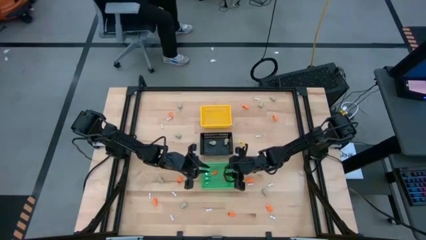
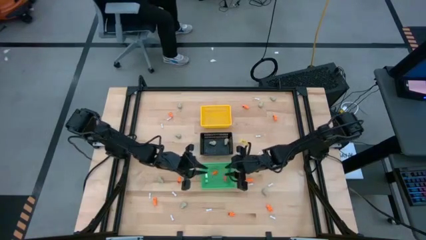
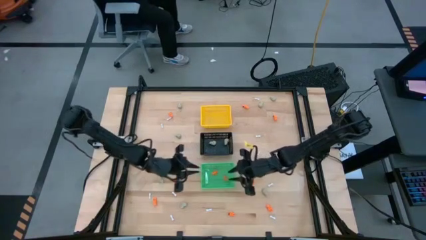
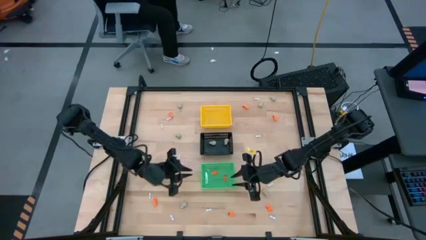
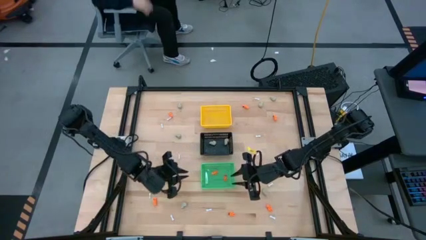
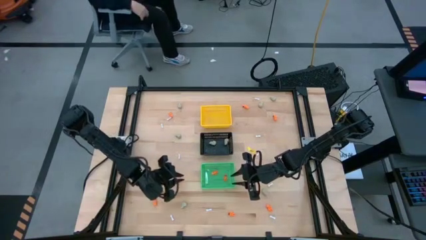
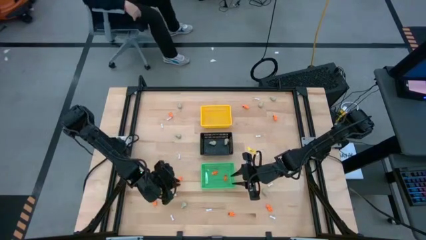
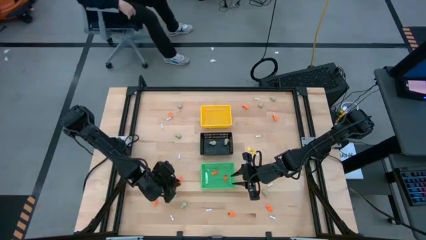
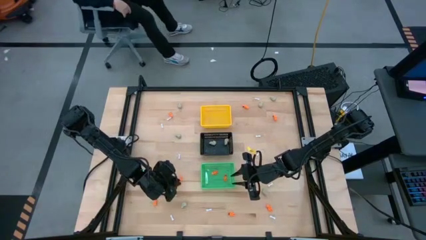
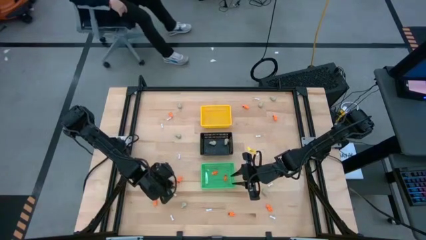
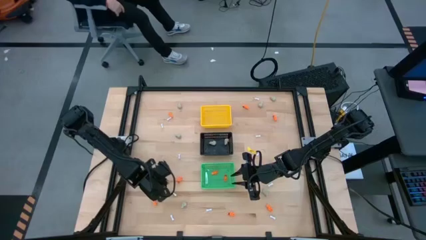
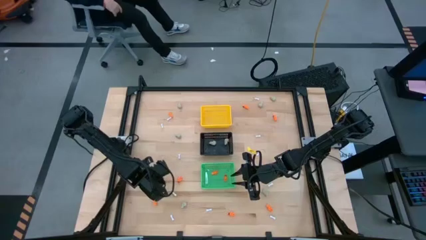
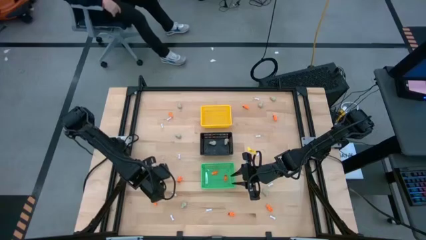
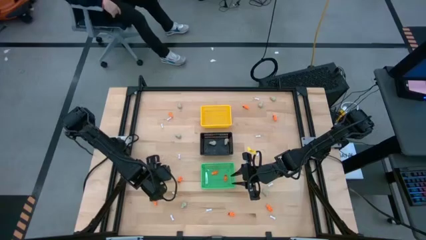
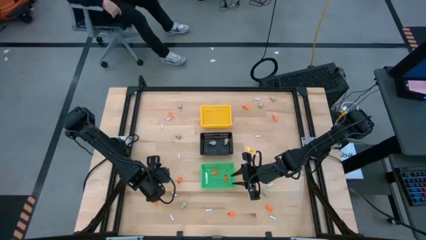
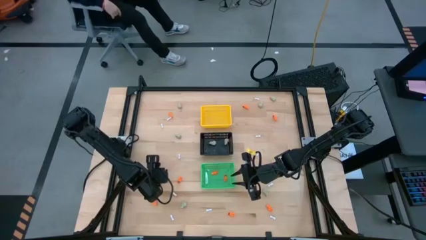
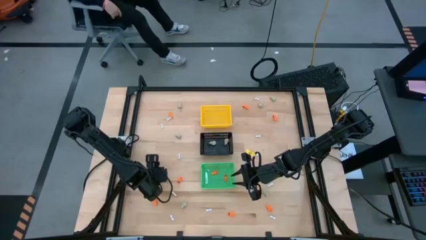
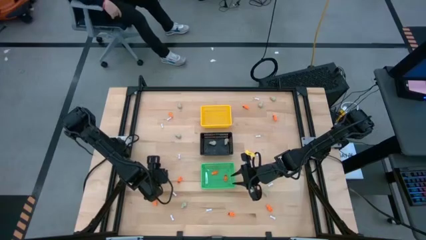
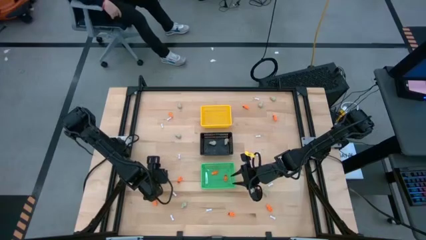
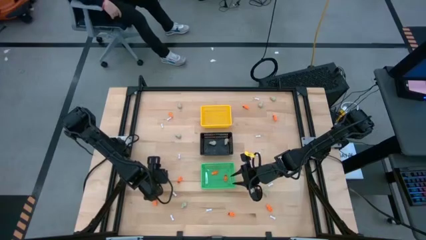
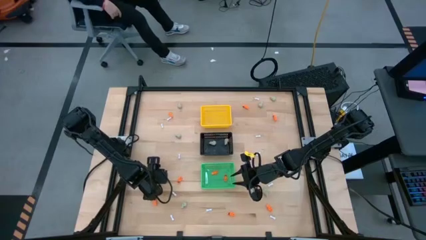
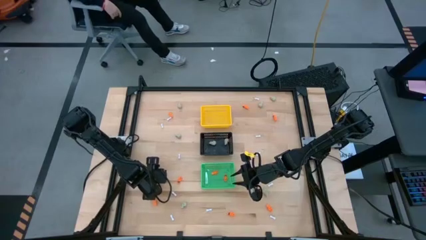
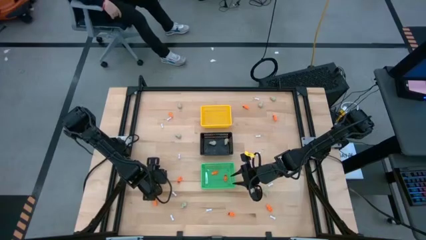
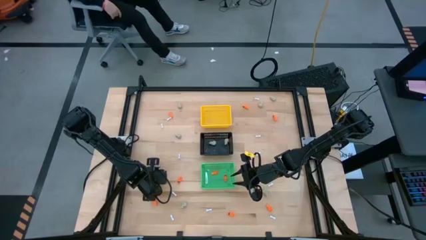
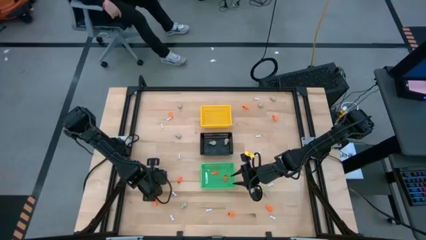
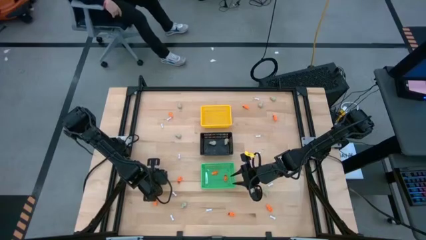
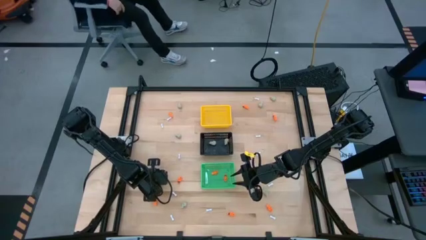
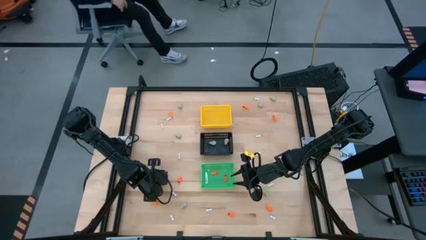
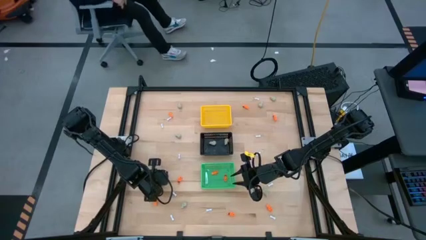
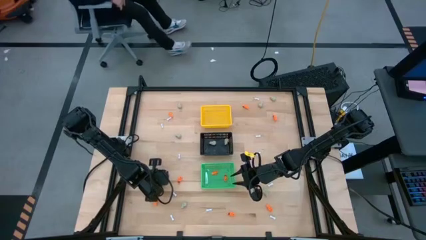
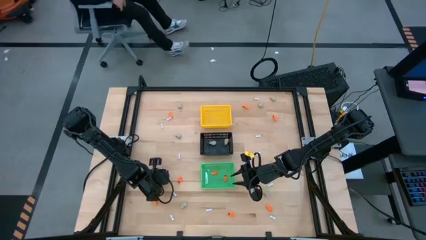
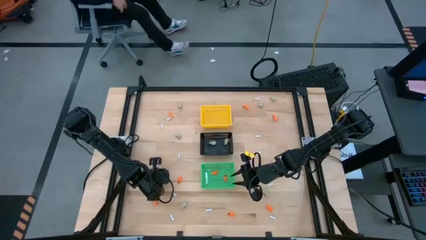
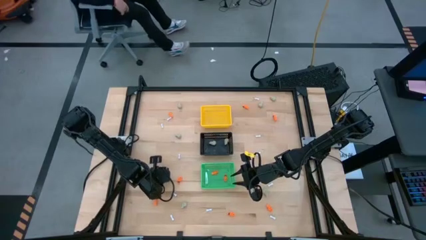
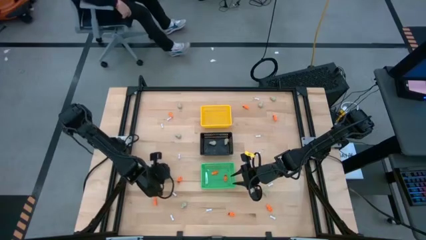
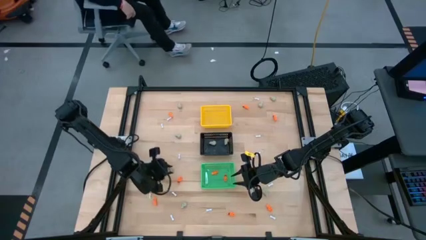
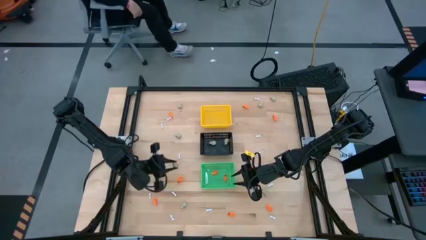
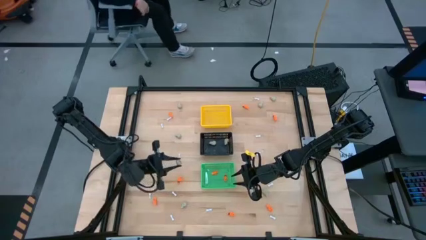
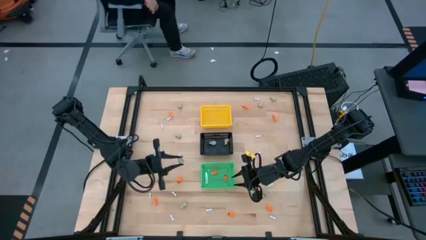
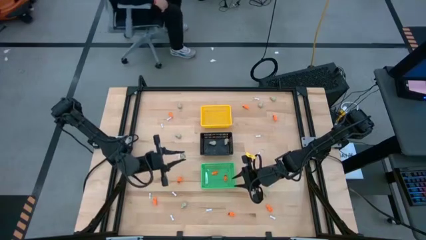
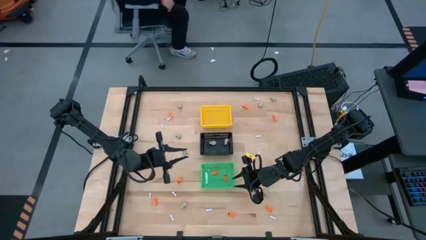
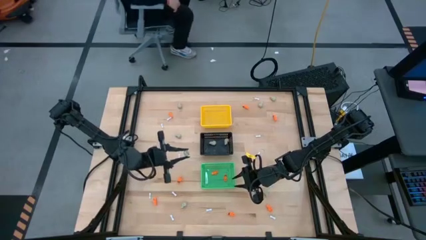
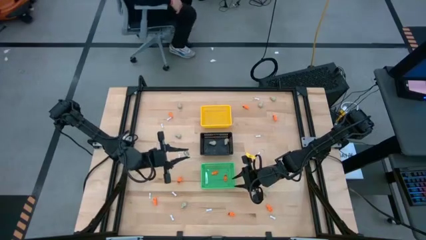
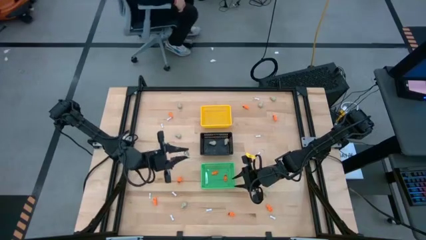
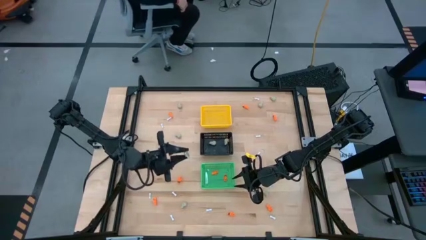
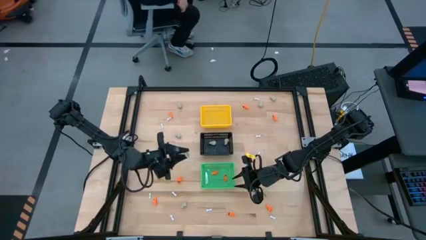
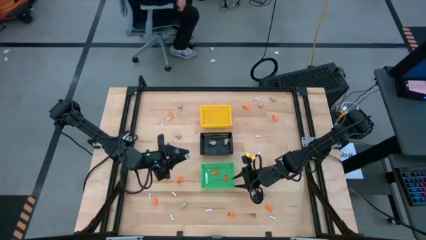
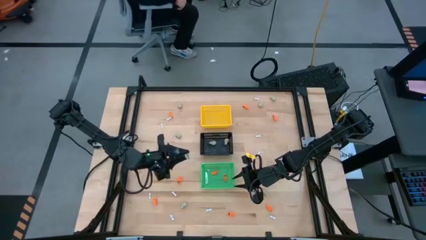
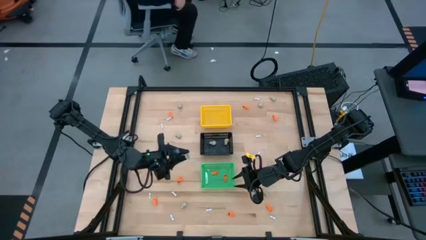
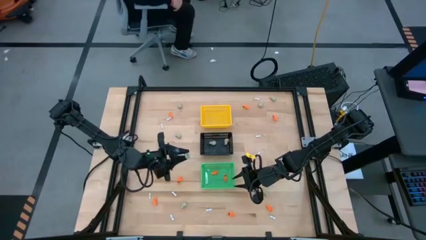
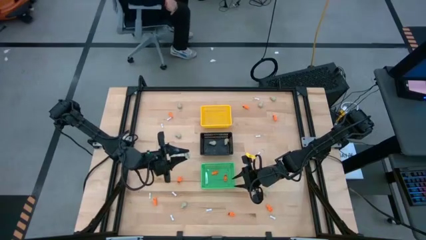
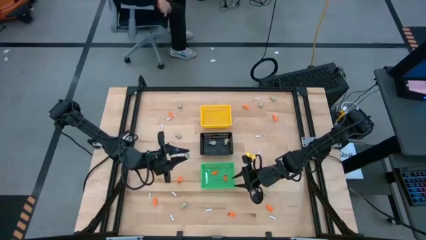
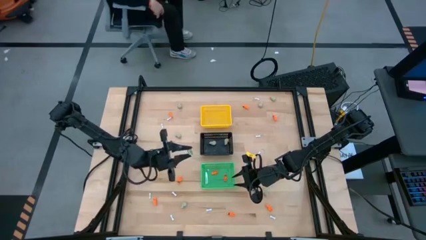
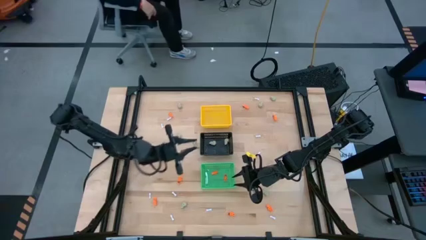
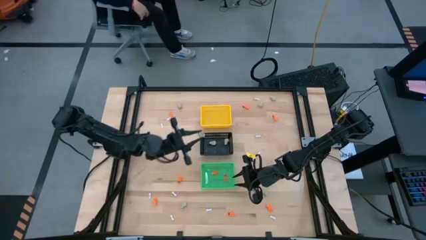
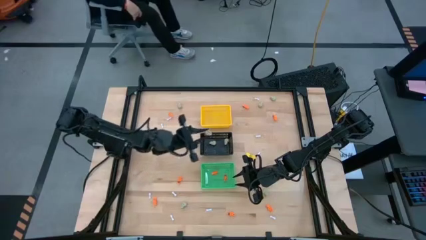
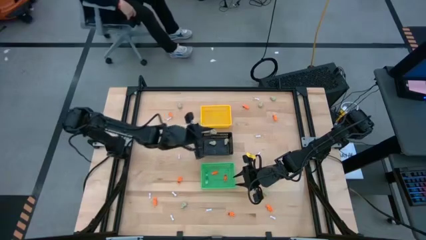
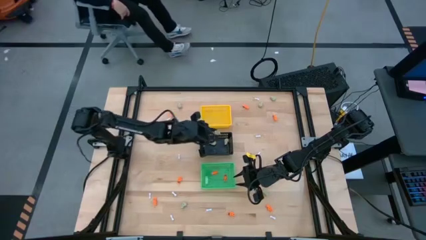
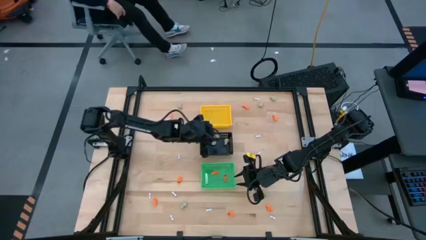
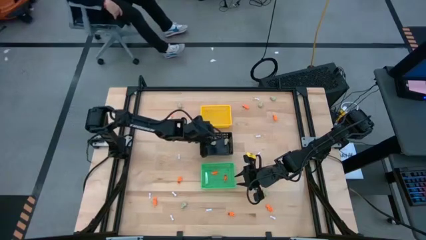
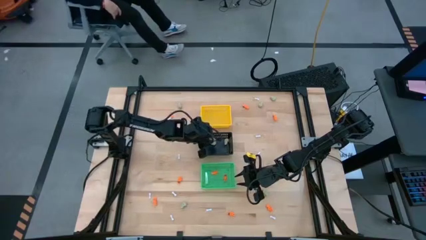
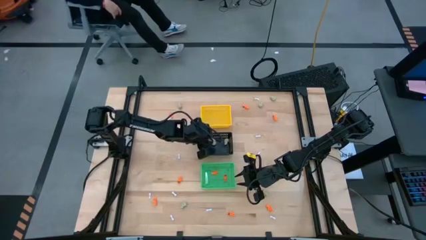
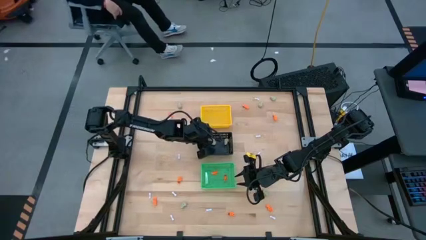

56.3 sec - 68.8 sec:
Task: Sort Halloween decoration
Put the gray skull toy into the black basket
